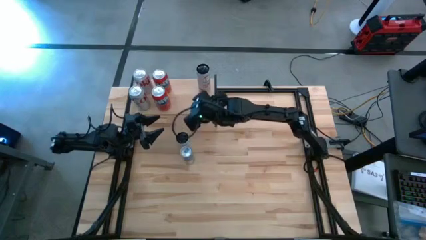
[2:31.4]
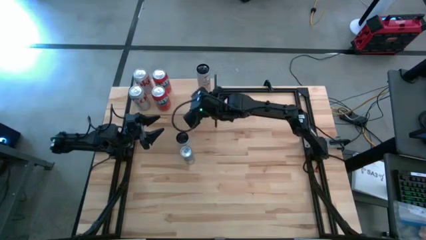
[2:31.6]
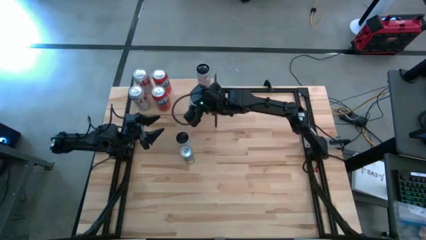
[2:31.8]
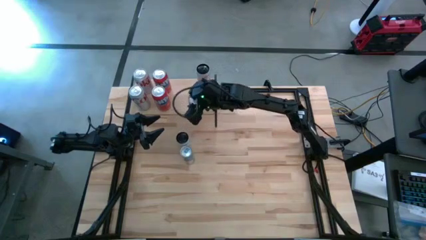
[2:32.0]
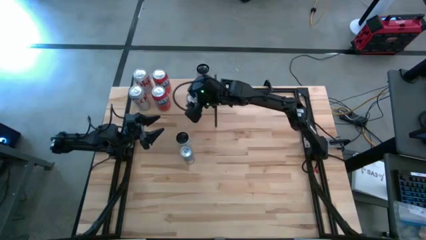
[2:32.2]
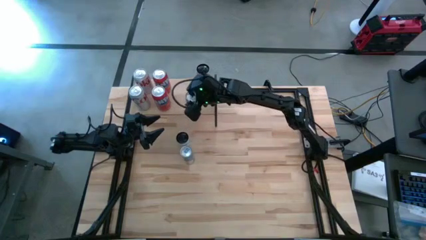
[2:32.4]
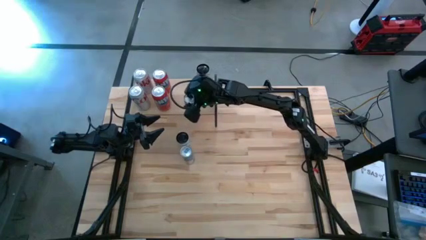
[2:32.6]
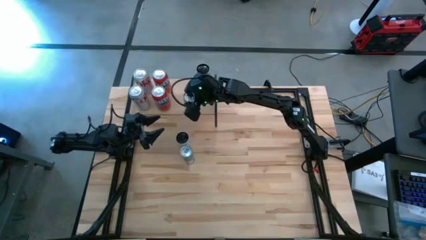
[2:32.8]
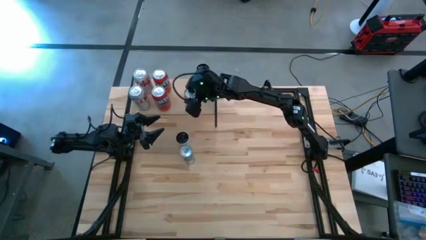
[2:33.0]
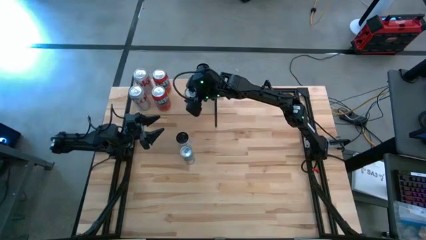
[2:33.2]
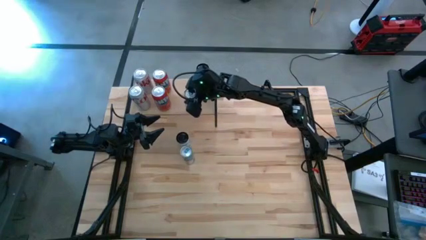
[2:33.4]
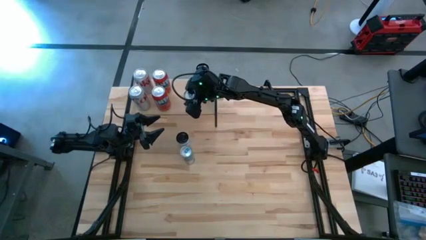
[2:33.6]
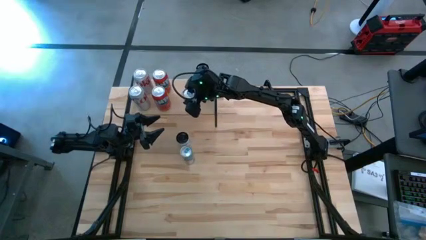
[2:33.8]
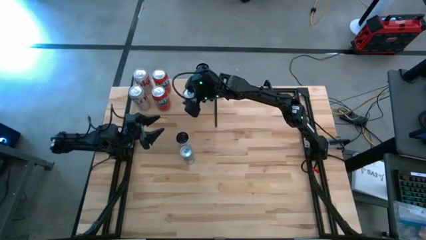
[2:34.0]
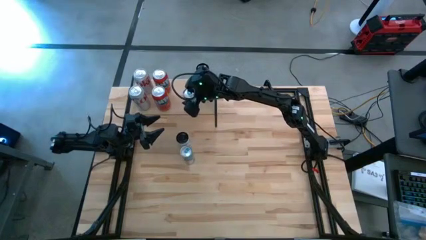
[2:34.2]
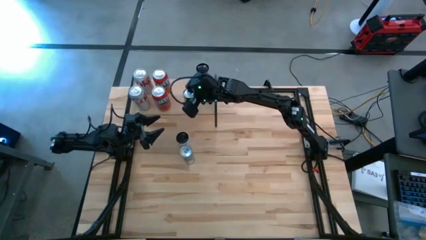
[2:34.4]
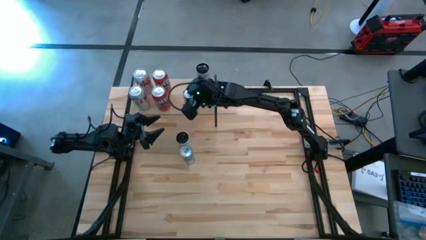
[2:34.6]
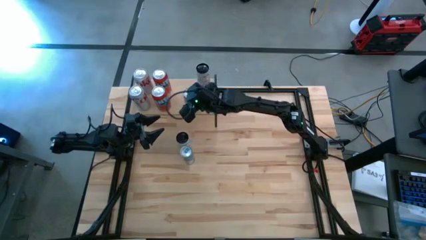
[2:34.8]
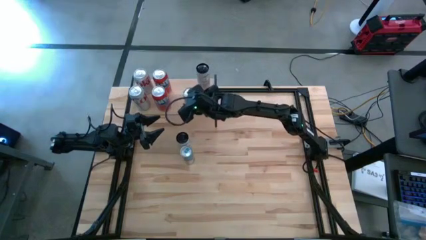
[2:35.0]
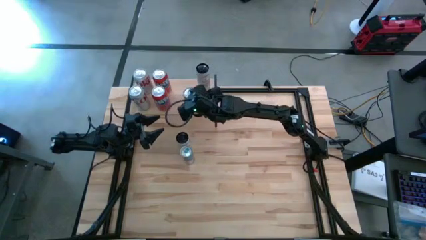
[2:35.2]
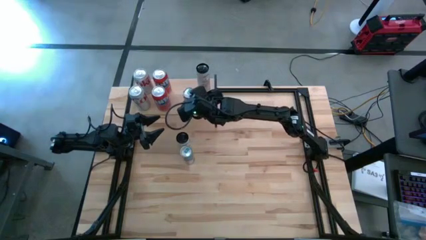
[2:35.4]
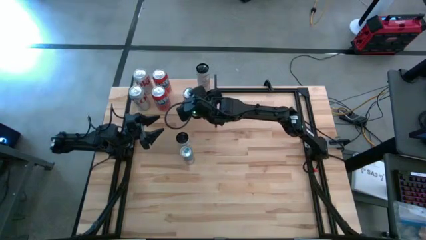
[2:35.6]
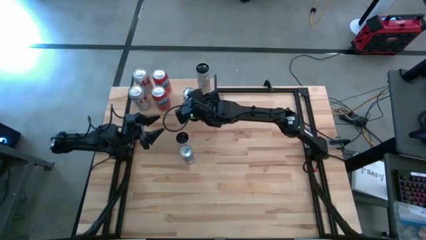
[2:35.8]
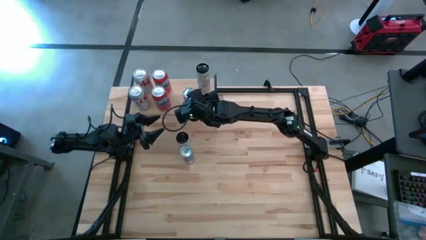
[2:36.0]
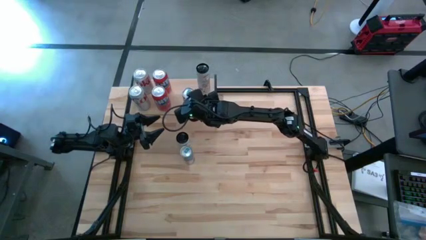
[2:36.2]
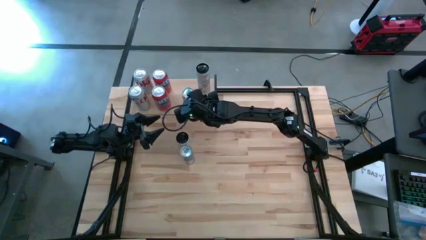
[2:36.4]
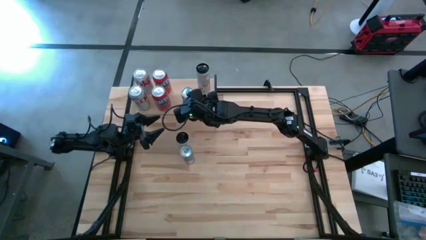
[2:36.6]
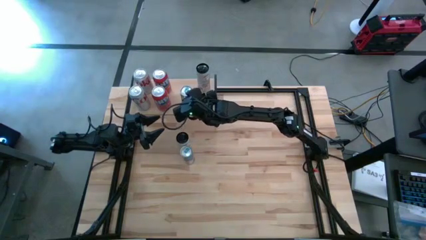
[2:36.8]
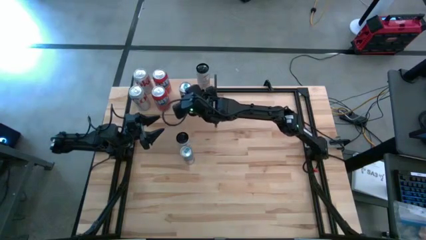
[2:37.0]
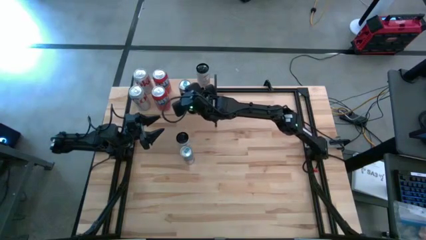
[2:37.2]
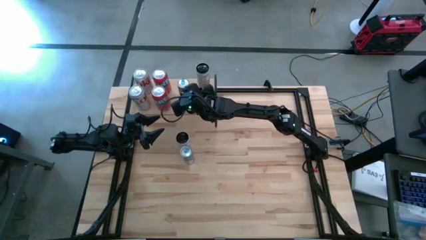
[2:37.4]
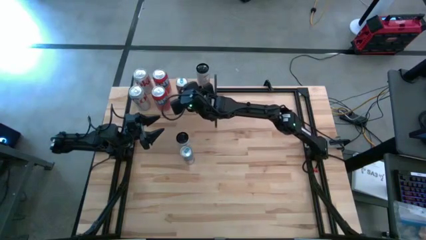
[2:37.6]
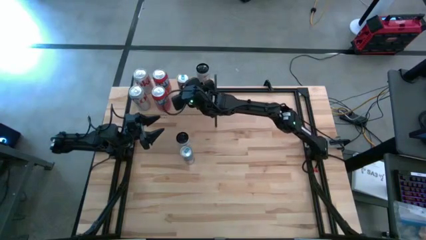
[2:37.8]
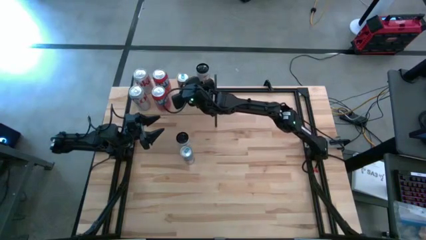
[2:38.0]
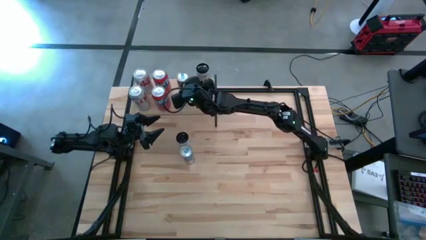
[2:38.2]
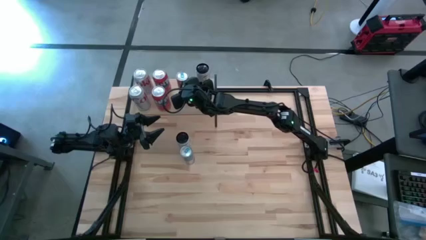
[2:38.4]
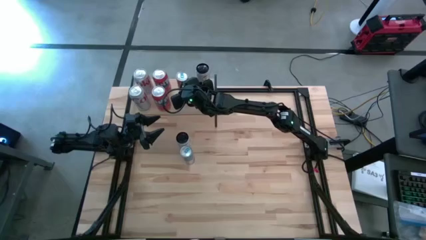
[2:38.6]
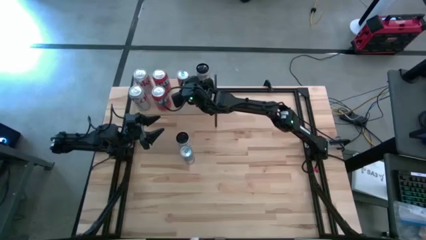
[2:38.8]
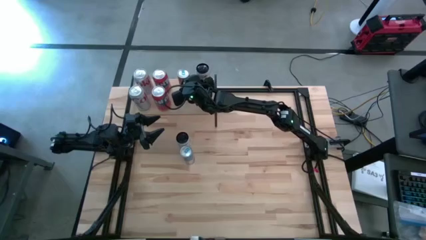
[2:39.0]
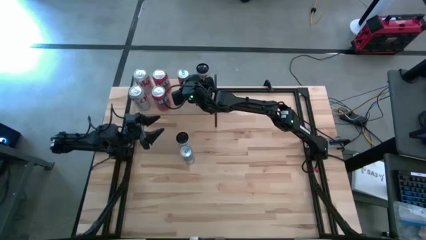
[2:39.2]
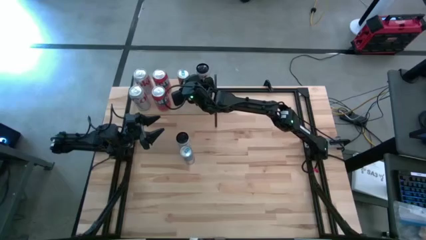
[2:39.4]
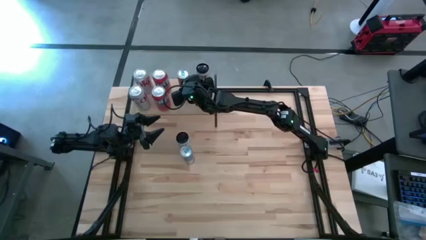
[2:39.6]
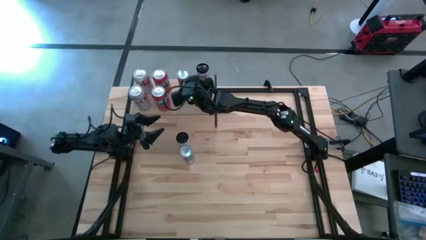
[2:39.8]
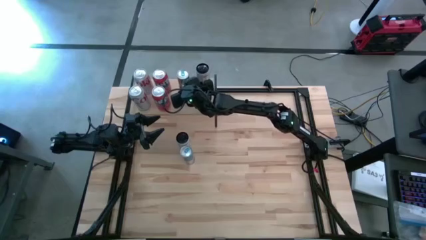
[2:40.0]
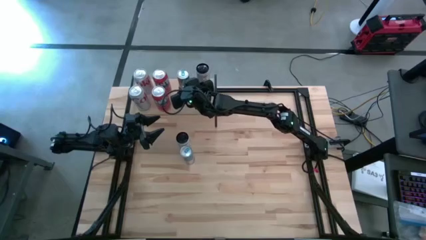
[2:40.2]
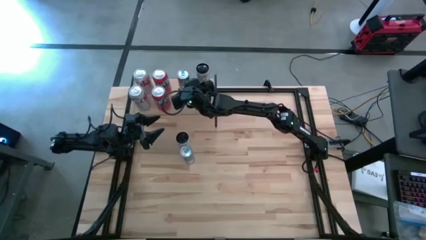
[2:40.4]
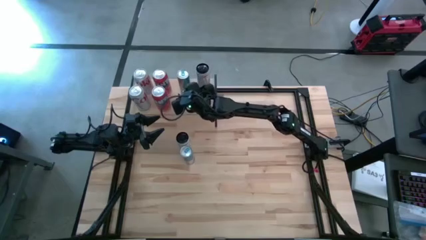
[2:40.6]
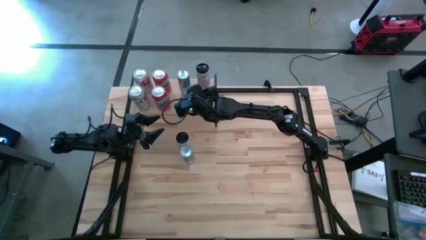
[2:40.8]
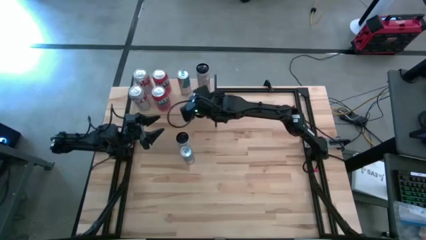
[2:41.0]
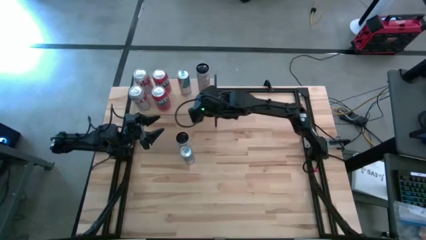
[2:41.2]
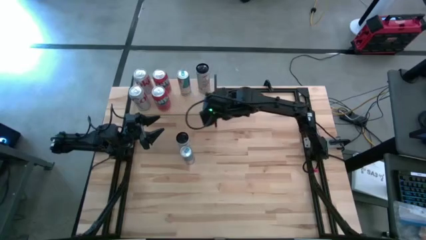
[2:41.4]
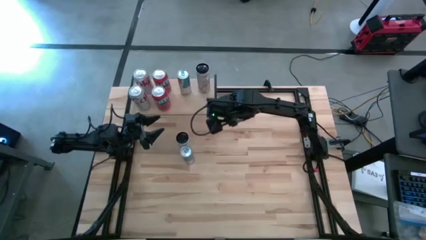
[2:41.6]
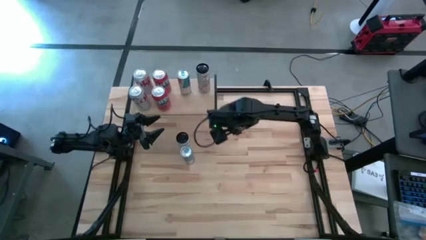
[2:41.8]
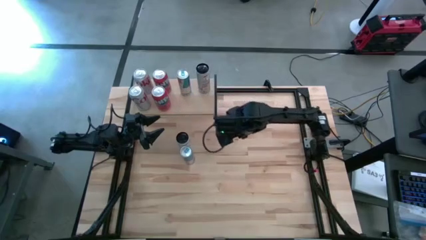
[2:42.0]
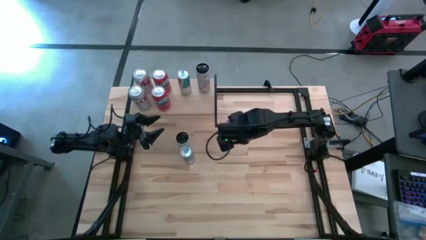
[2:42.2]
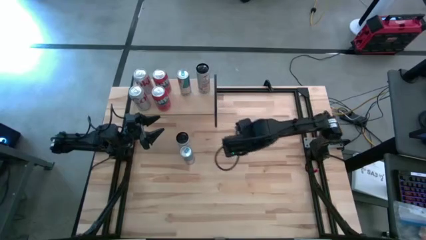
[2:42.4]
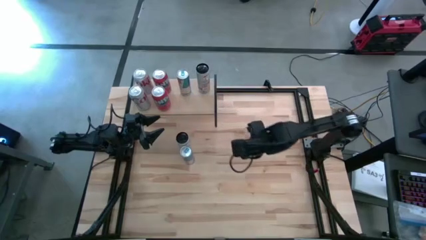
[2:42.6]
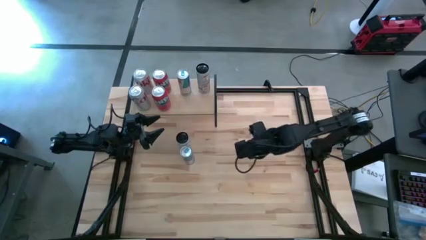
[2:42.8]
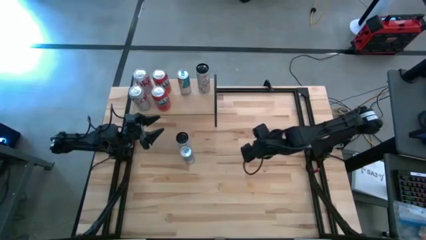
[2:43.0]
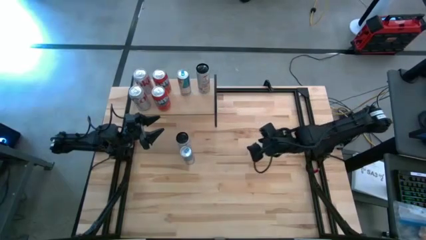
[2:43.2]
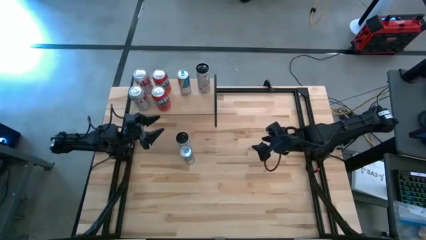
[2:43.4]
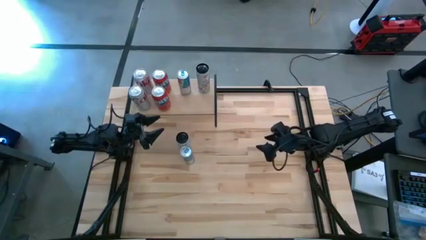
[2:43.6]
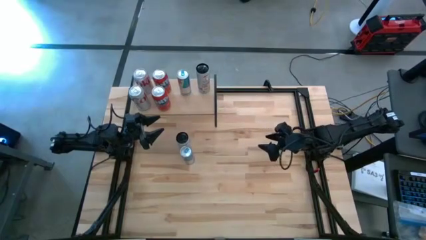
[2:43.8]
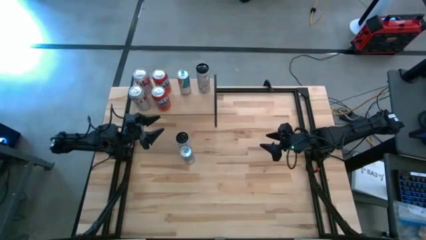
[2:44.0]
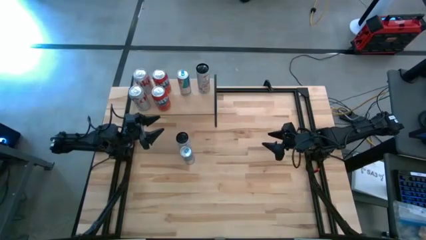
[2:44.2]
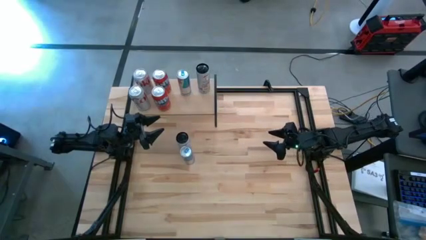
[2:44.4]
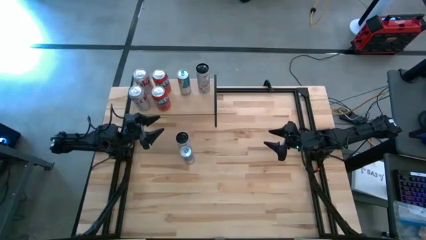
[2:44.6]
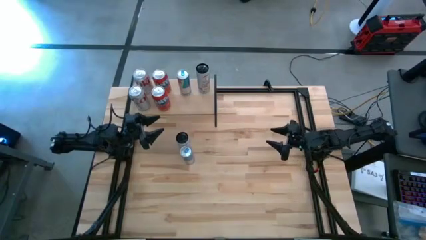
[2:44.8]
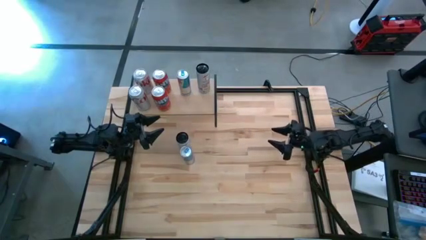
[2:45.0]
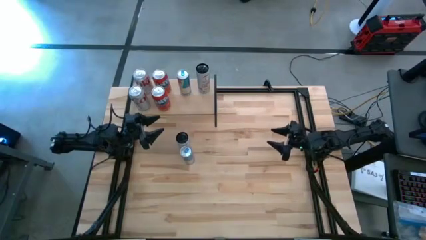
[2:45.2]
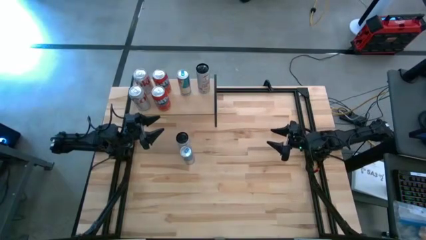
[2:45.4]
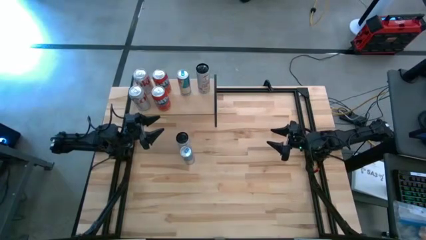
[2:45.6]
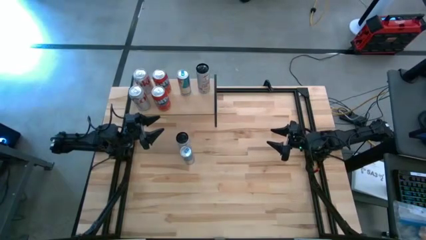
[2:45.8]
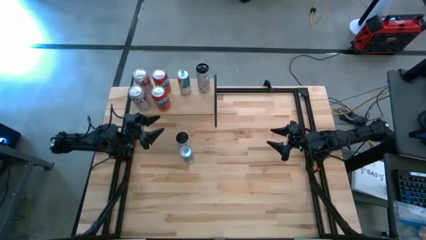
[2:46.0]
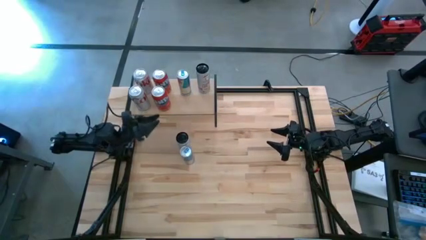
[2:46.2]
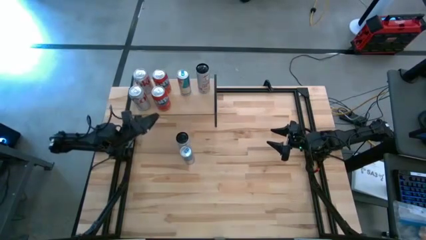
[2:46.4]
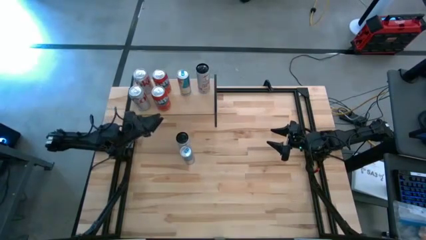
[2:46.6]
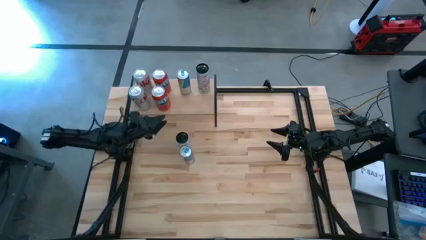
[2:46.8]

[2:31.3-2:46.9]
Task: Place canned beverage on shelf
Put the bottom blue soda can on the shelf
